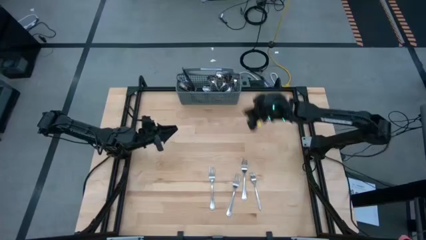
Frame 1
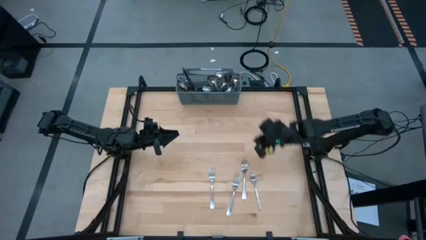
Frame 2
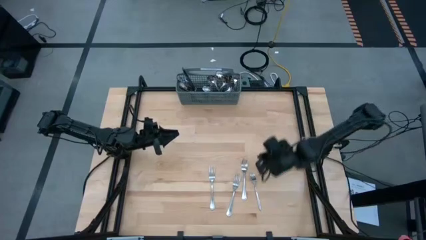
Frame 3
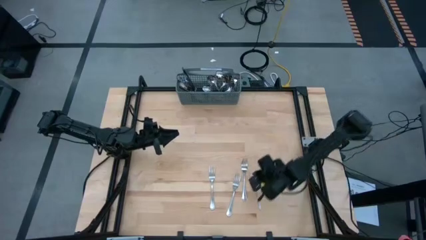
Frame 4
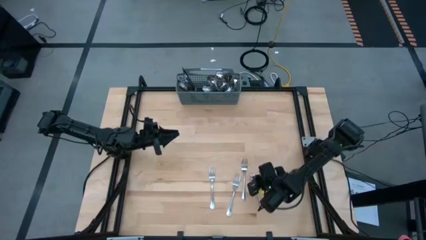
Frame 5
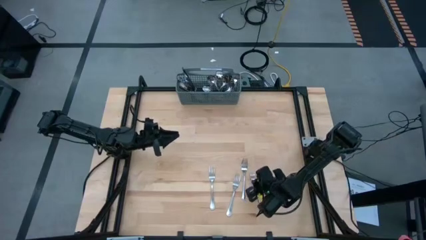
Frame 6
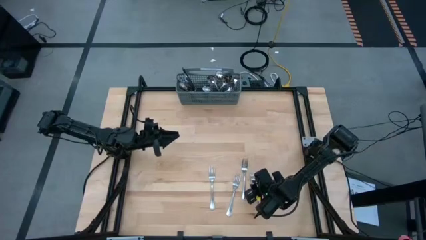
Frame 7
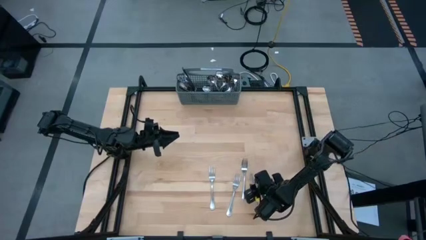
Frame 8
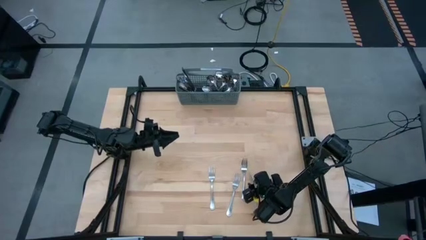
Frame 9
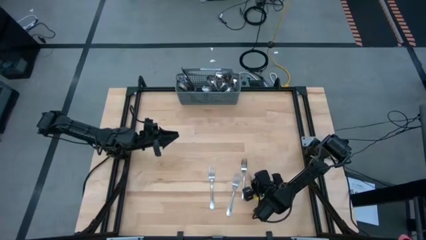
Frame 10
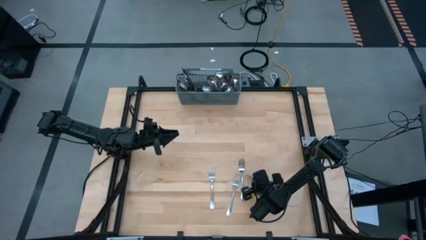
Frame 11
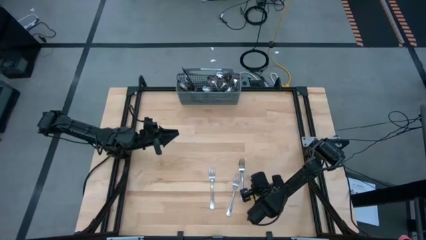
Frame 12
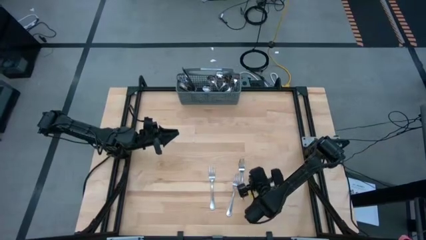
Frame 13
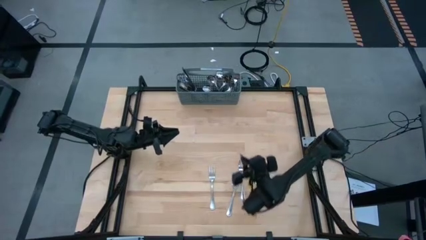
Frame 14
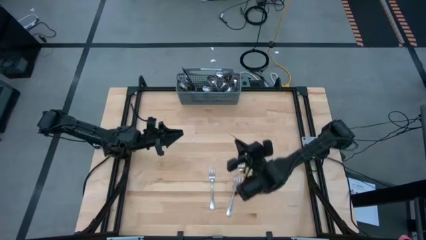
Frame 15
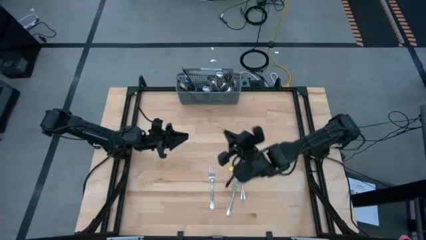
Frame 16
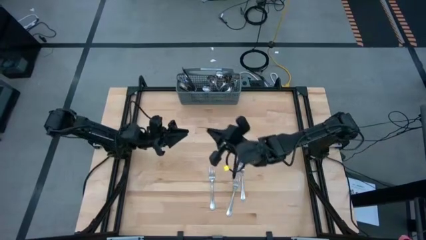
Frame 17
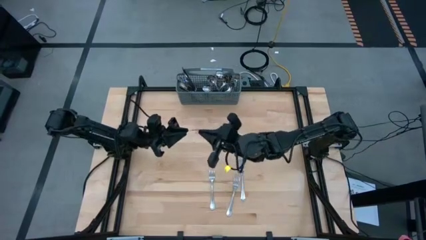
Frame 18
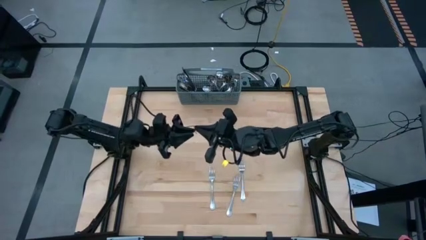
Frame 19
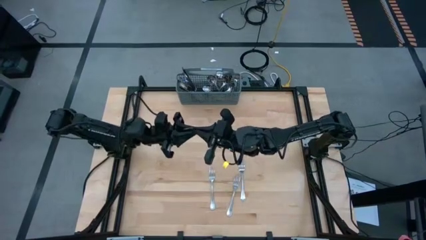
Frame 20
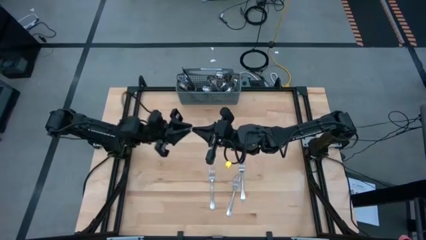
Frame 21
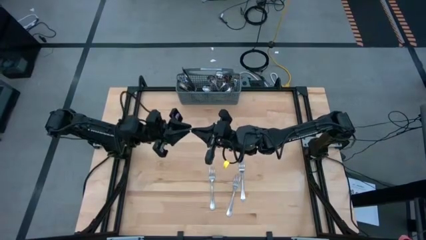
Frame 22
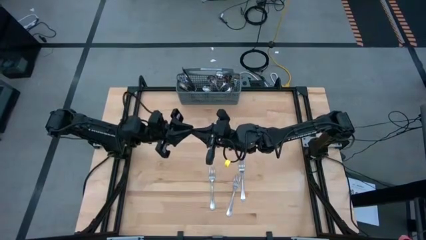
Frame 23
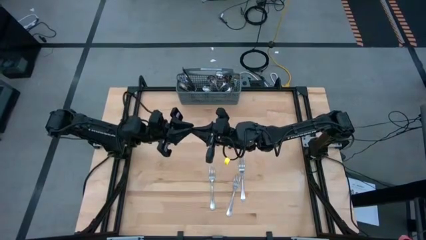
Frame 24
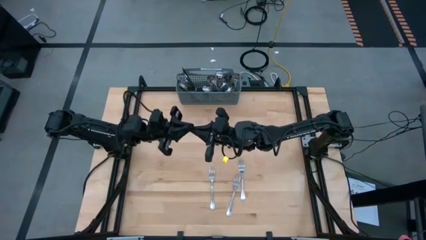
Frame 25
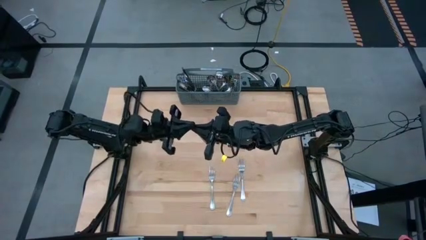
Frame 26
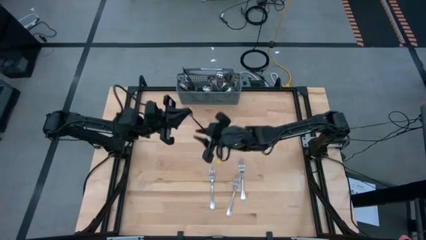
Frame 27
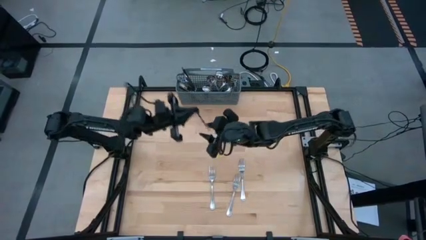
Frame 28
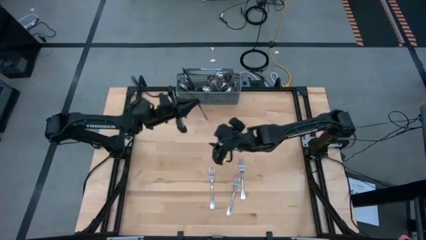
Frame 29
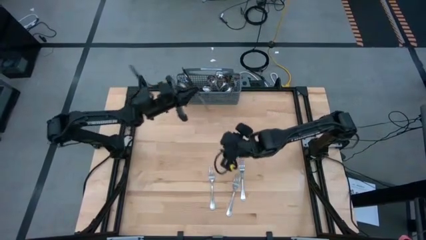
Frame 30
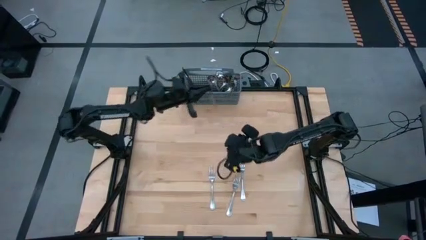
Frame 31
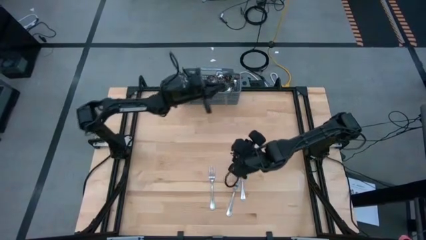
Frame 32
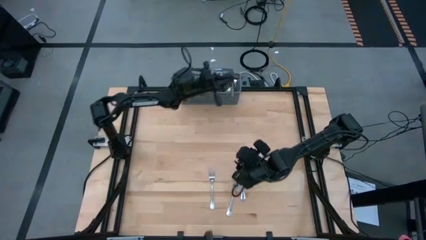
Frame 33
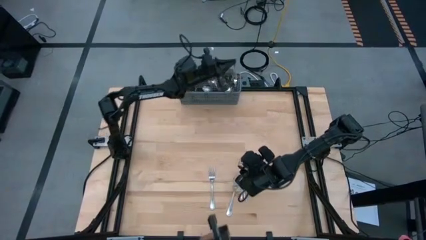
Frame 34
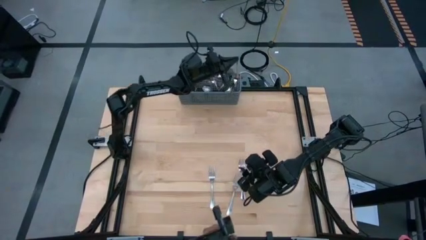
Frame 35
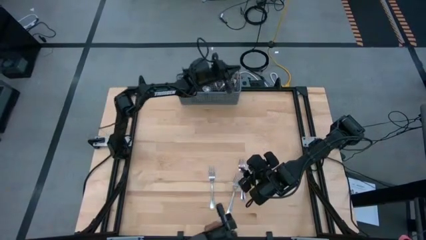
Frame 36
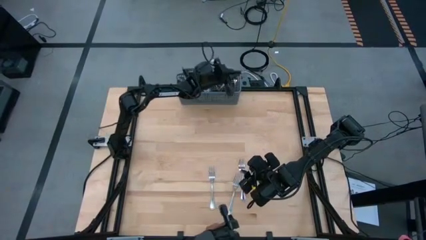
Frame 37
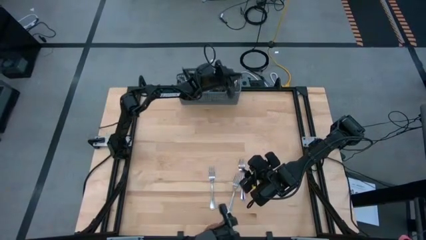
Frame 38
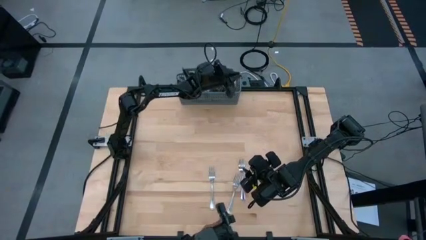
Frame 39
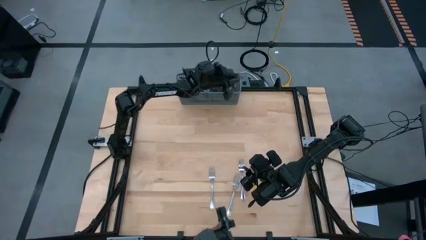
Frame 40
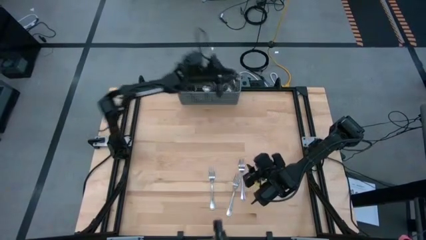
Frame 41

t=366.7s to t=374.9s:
Task: Sort silverware
Put the silver fork into the utensil holder

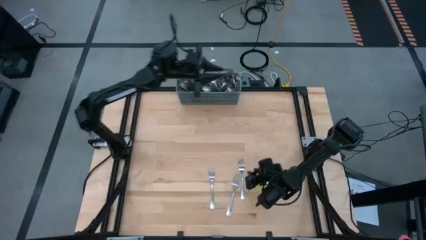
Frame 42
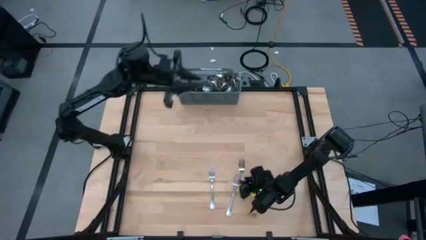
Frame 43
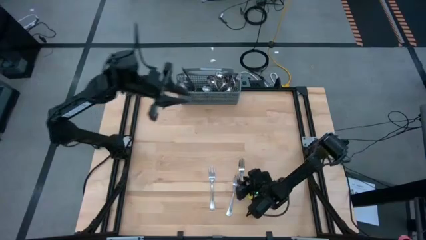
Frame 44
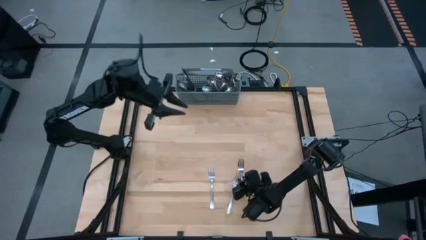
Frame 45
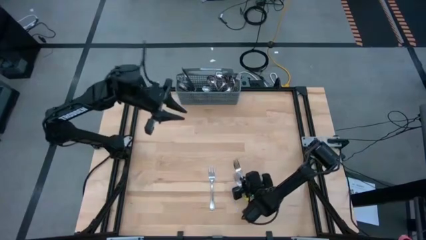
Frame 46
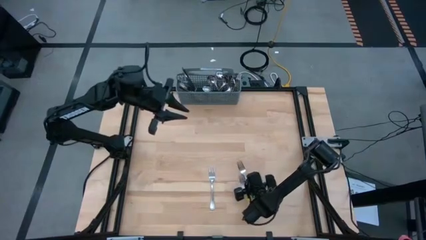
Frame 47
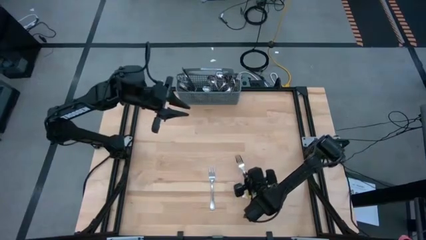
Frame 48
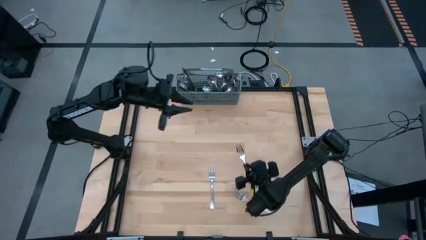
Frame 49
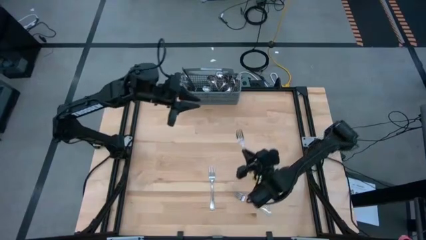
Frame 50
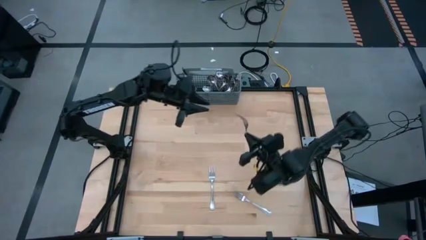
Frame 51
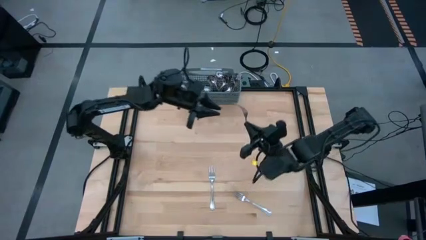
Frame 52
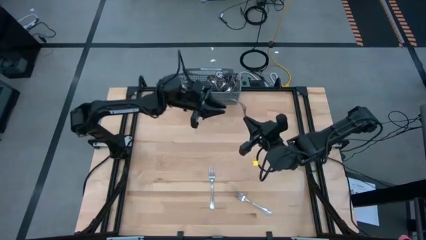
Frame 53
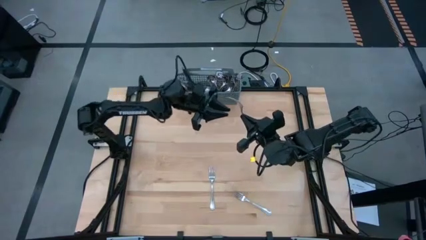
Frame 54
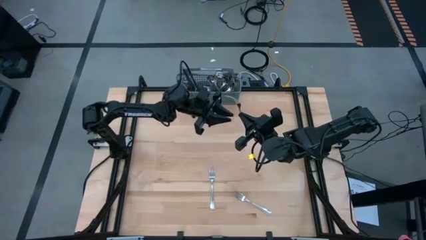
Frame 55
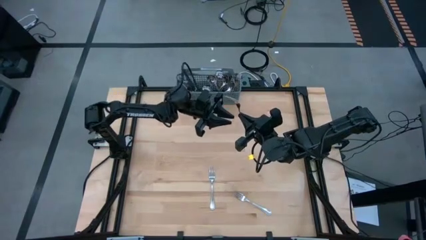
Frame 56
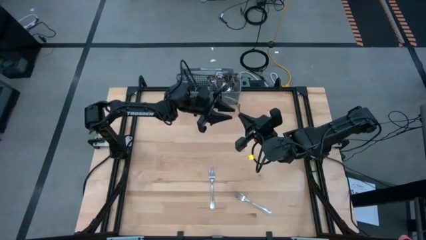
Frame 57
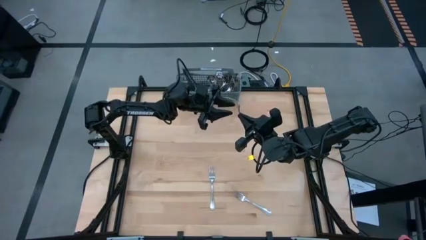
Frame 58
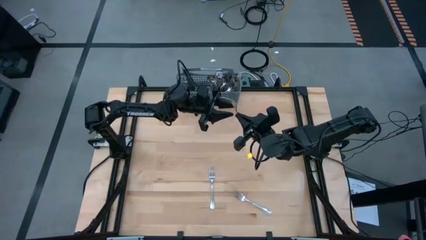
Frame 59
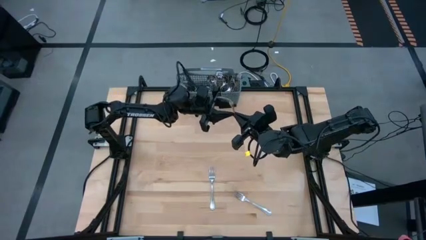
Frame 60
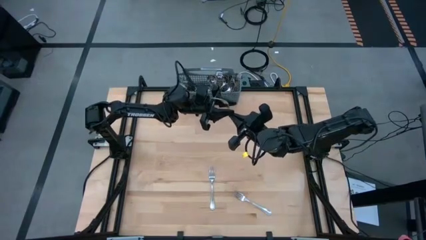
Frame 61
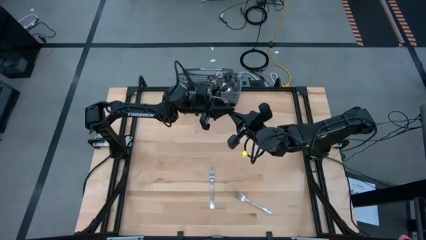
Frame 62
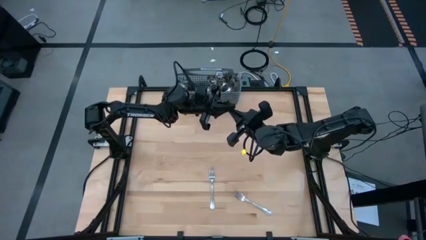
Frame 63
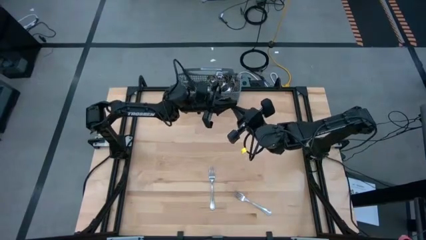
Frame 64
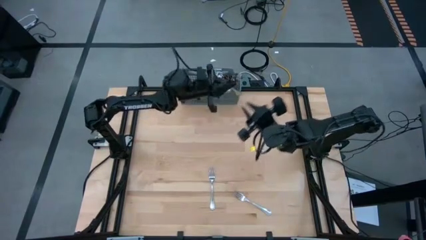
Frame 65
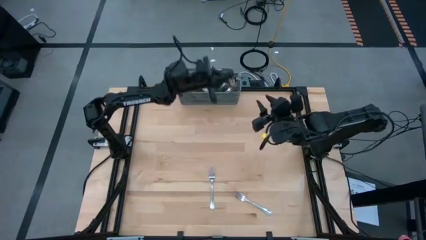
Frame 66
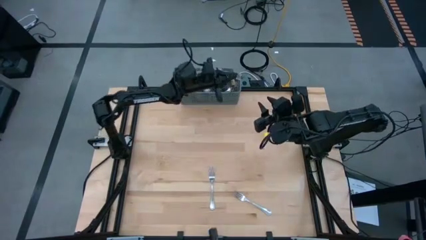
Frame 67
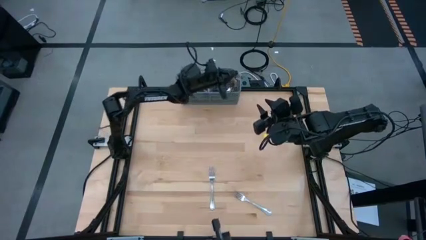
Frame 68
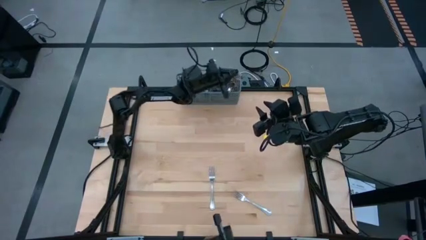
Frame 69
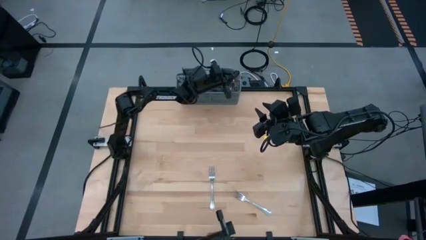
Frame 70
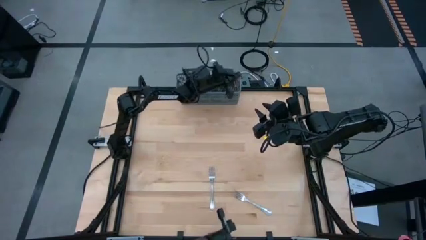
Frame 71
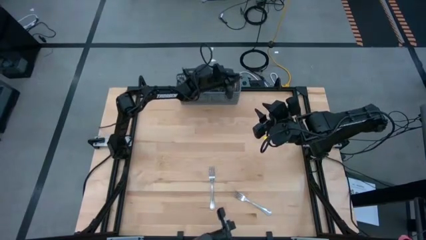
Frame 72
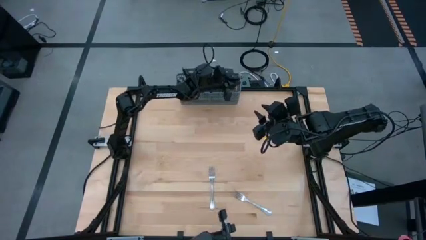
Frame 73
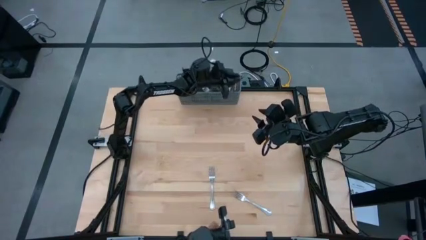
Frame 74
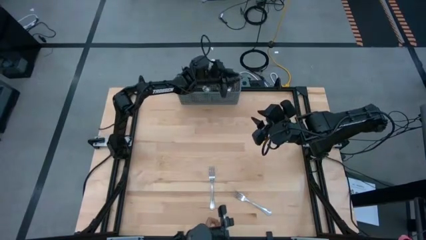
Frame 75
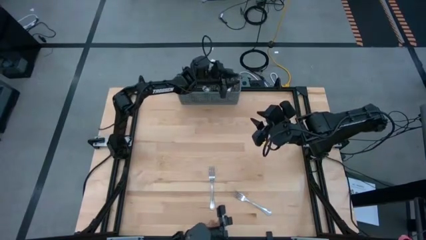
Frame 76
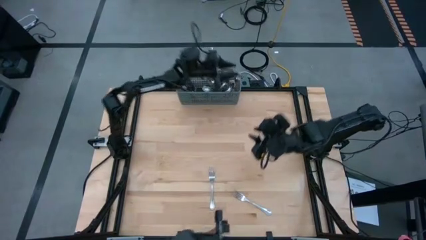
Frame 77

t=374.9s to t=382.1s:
Put the silver fork into the utensil holder
